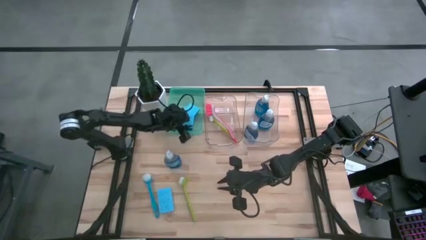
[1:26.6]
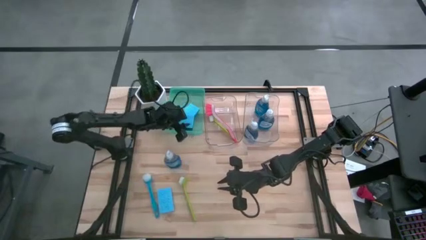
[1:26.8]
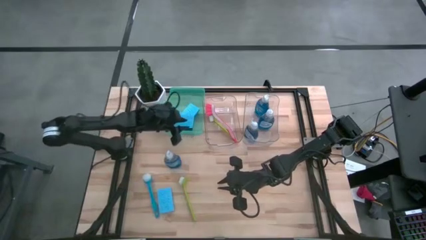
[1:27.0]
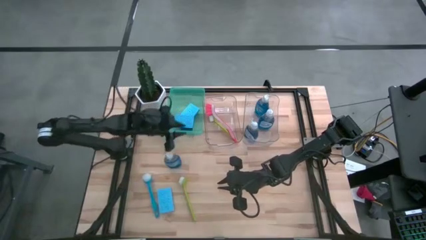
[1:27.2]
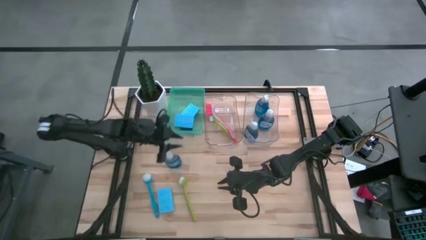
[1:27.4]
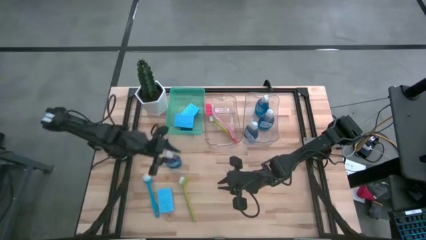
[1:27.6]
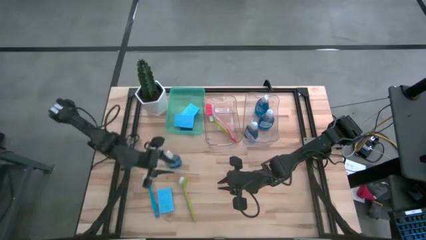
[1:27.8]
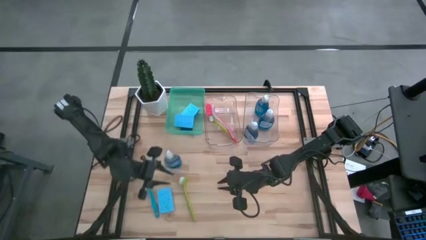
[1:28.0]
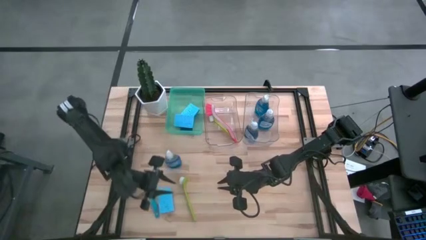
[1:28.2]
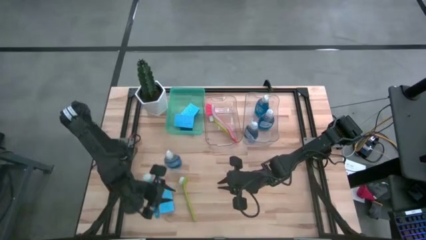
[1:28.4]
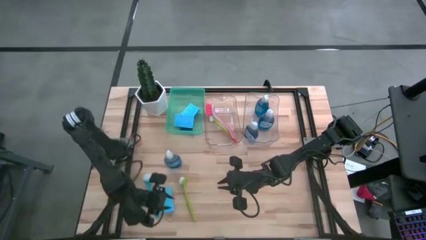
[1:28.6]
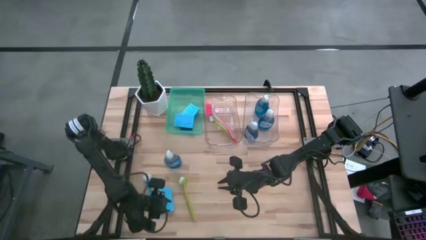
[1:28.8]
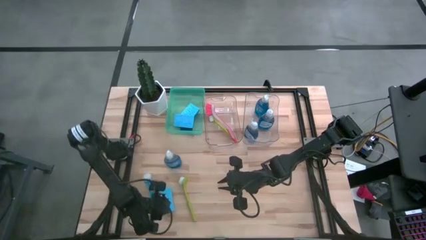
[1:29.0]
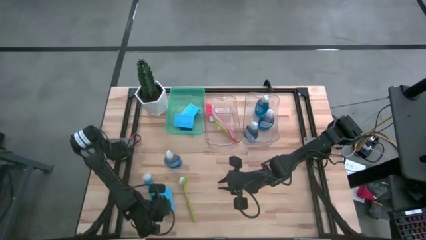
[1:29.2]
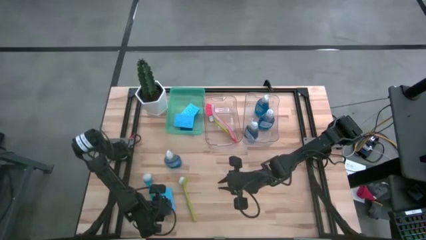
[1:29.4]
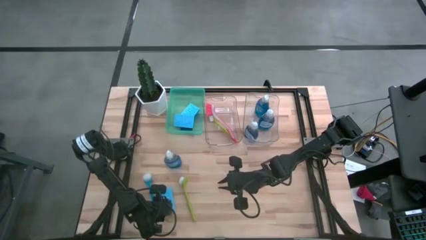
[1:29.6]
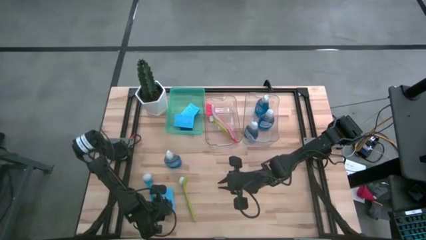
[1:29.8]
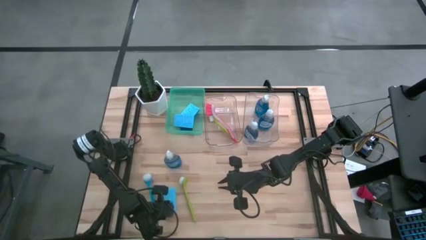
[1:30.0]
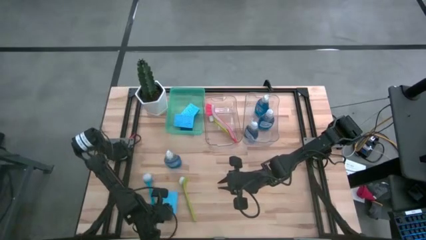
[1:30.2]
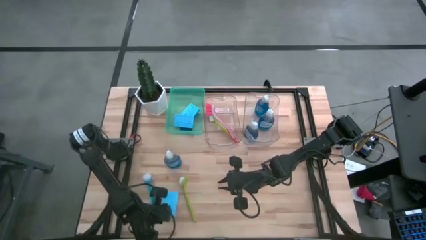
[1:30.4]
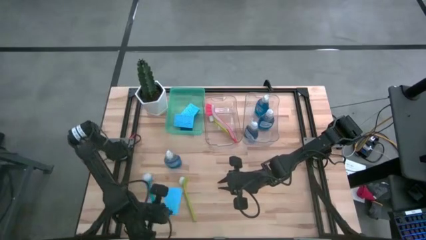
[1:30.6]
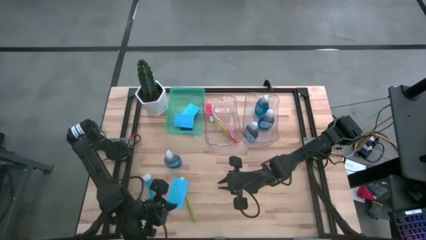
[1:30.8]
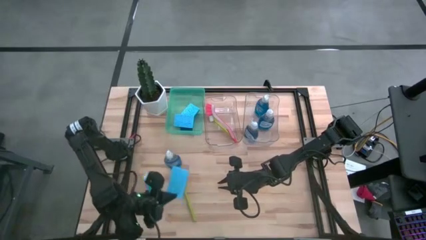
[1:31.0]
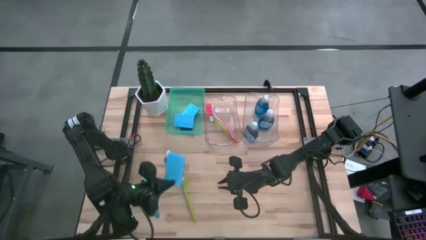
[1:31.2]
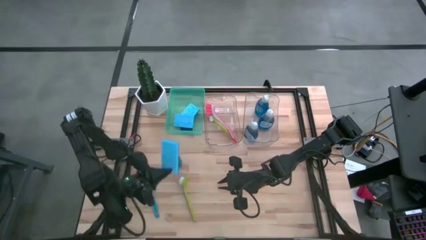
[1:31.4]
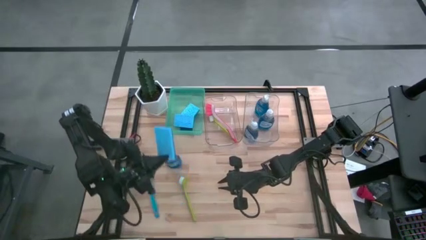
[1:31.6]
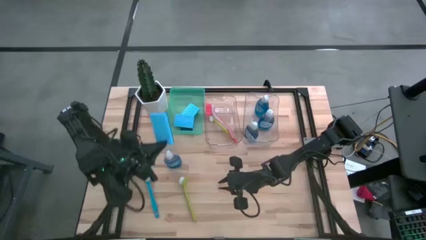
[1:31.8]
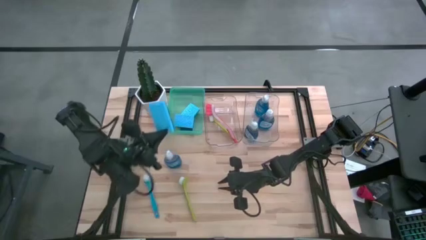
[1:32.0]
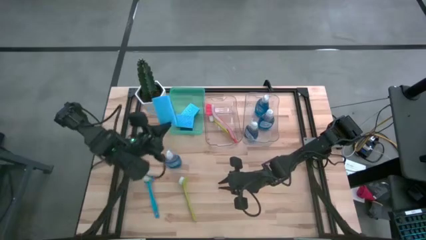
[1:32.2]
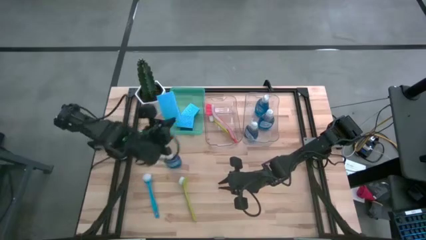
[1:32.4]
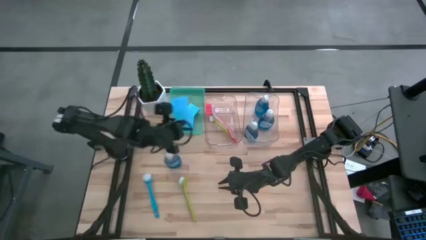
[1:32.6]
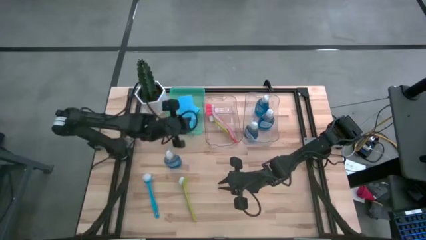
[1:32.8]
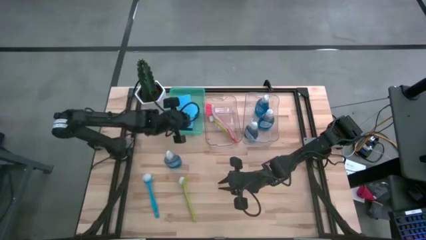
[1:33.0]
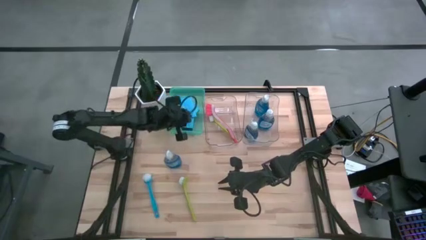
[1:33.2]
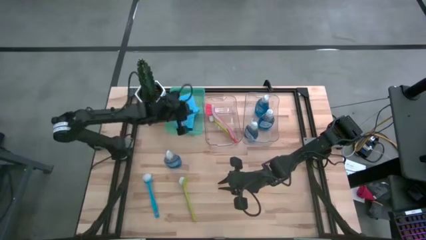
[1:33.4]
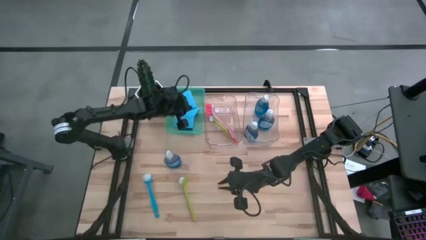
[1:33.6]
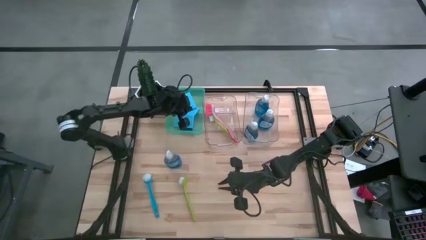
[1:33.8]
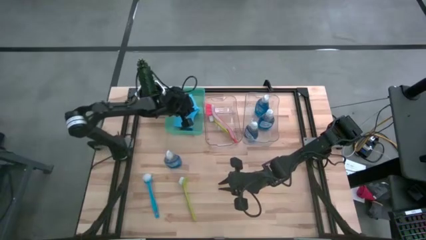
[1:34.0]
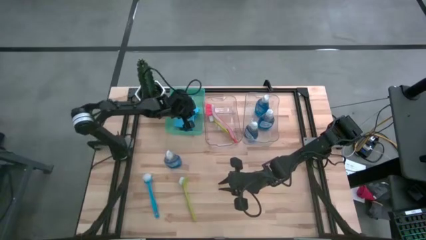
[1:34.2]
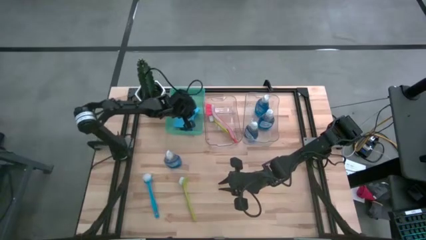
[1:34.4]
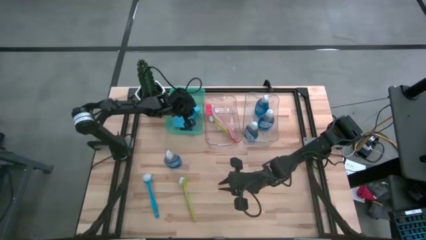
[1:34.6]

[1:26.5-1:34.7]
Task: Pick & Place Kitchen Sink Supplies
Put the blue sponge into the green bin

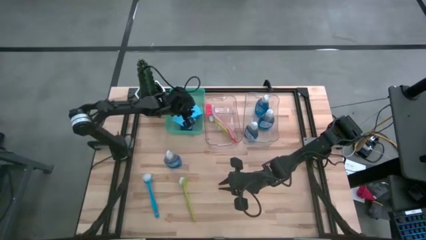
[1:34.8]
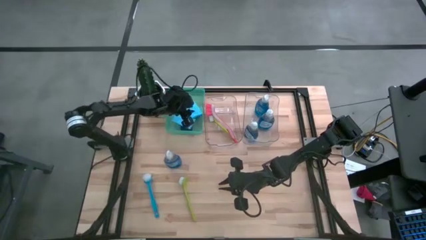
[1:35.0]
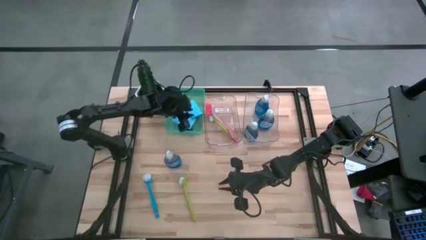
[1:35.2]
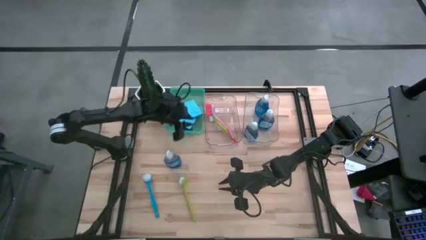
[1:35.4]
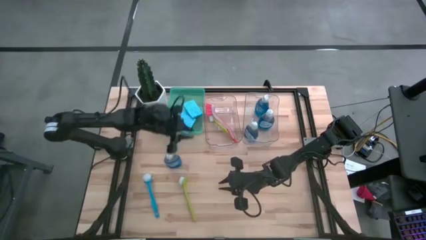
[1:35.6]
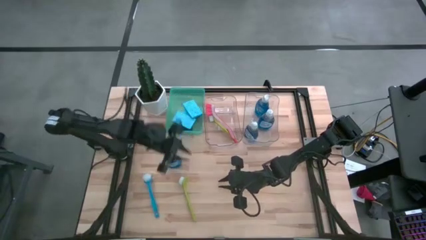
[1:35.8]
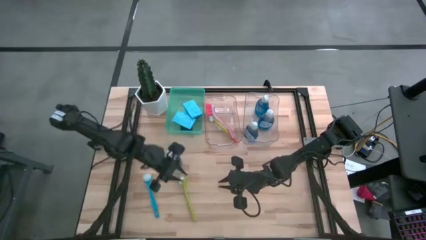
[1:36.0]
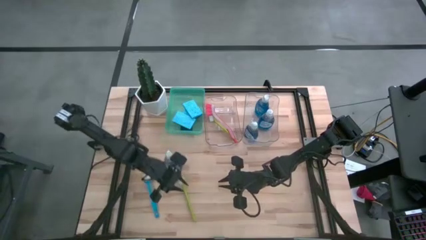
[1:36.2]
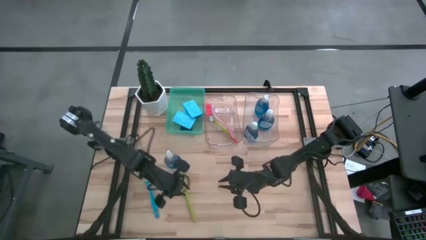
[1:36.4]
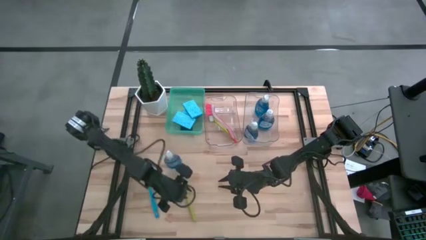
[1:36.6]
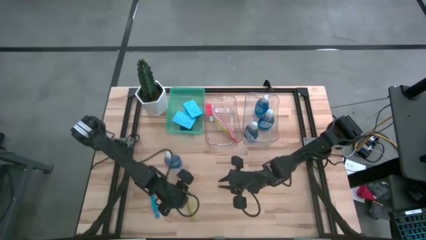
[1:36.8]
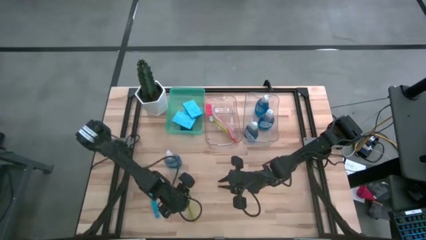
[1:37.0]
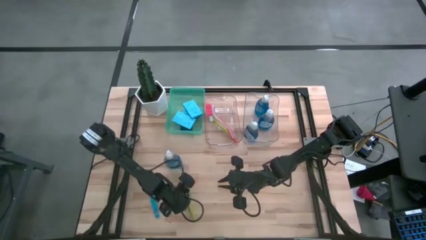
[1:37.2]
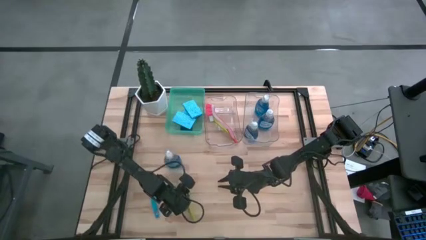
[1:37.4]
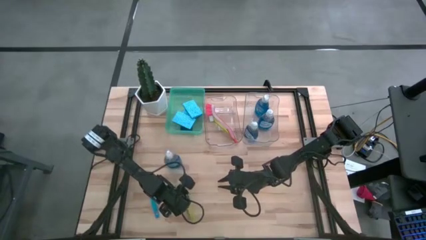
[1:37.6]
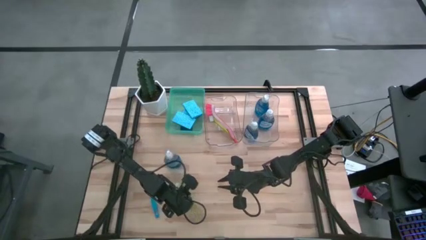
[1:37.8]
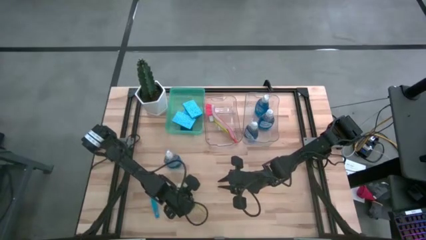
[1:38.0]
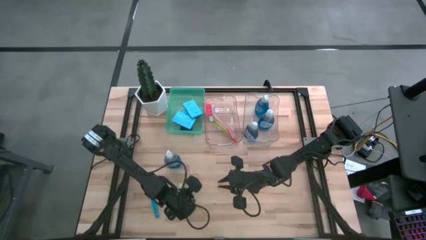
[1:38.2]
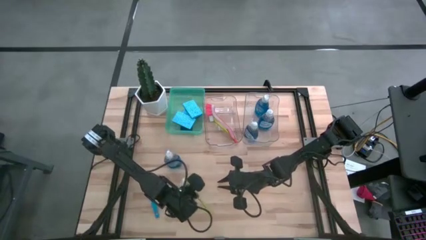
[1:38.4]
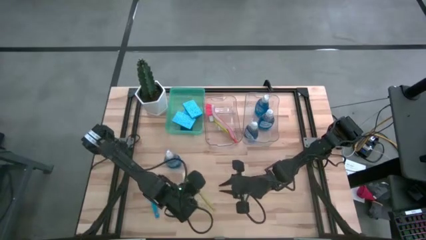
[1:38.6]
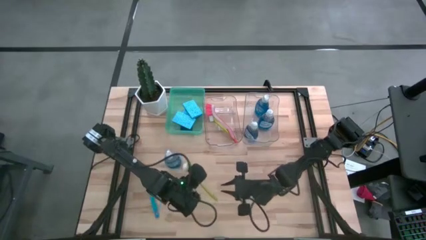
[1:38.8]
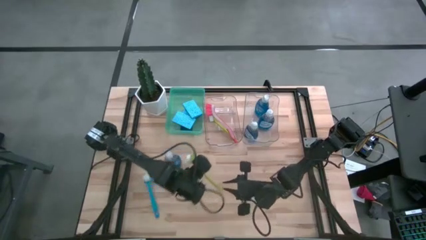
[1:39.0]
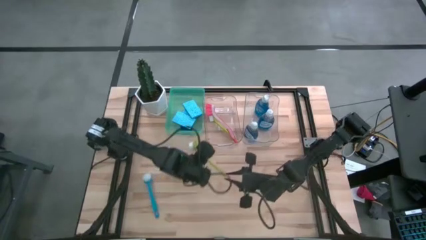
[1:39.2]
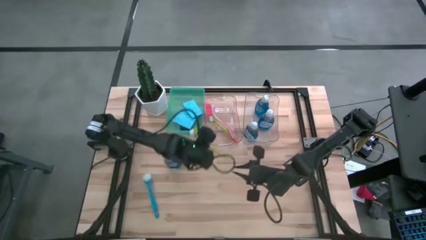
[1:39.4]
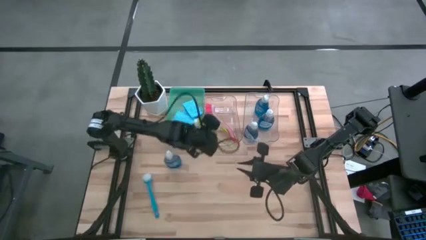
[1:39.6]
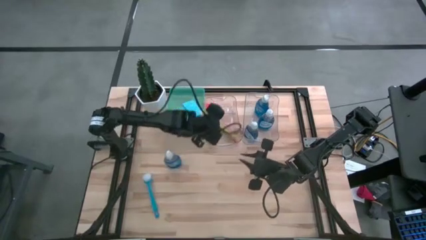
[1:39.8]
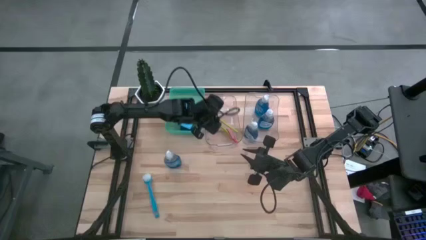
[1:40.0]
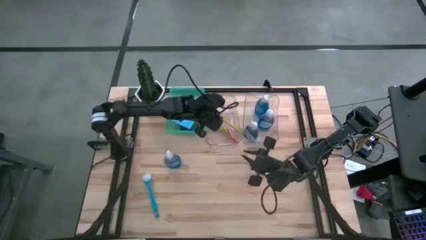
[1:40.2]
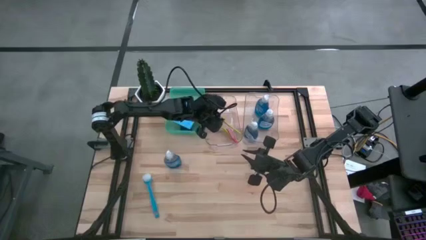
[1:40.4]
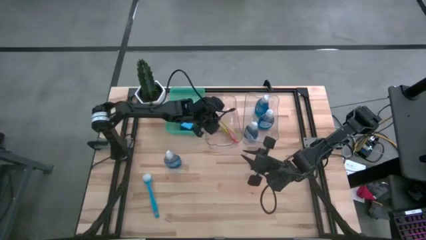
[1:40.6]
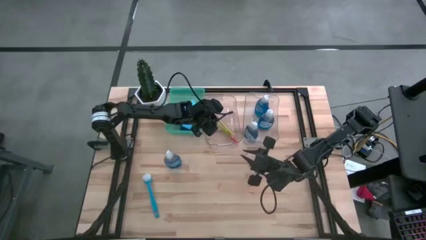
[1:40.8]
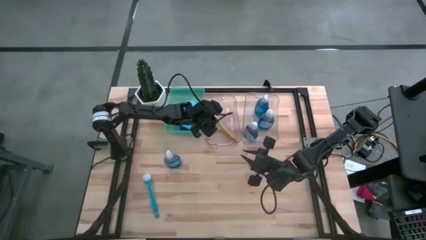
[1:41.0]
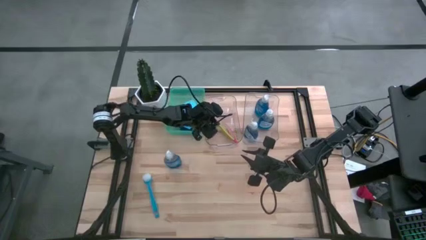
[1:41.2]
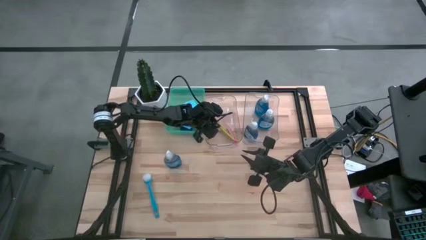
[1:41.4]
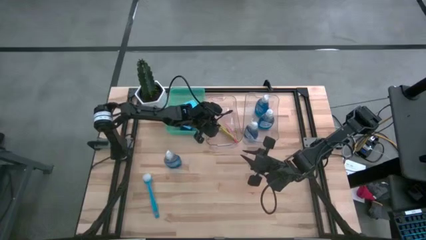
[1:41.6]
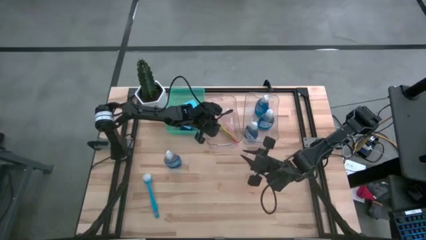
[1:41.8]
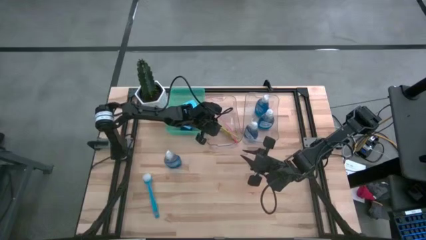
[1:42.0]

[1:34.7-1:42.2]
Put the green dish brush into the left transparent bin

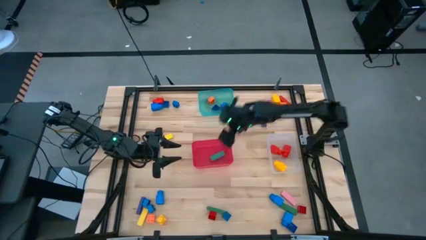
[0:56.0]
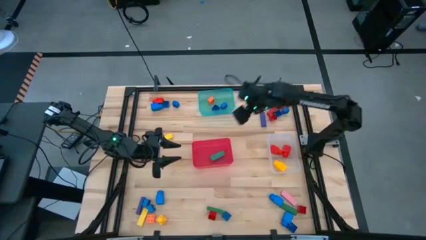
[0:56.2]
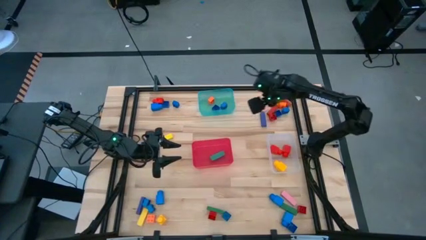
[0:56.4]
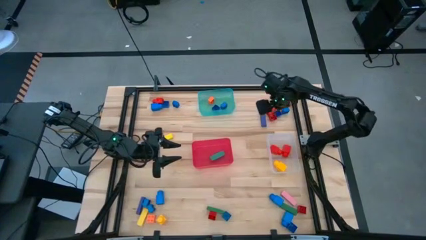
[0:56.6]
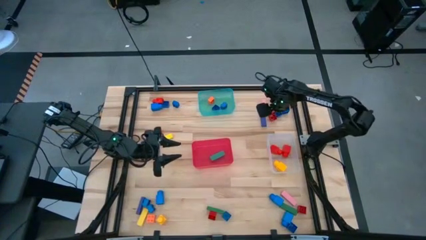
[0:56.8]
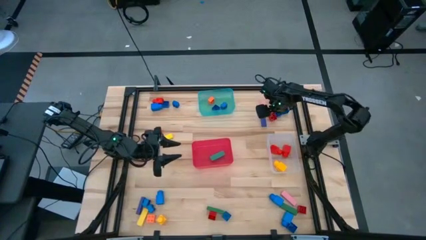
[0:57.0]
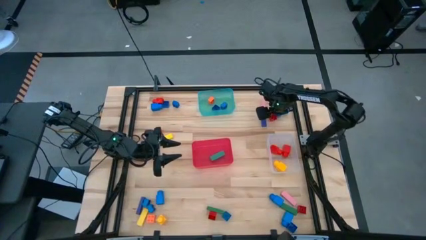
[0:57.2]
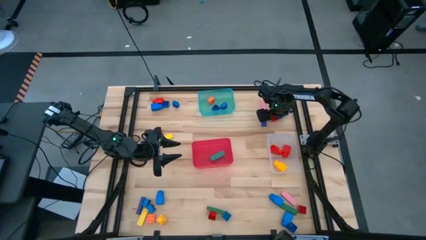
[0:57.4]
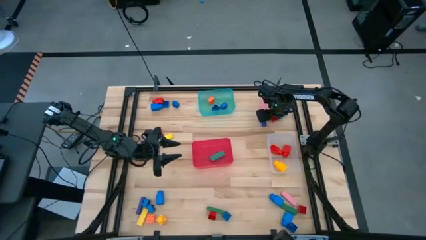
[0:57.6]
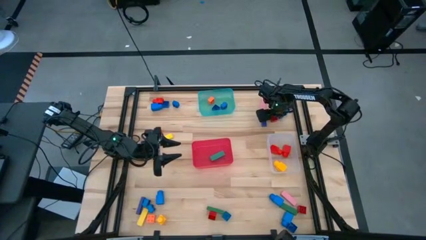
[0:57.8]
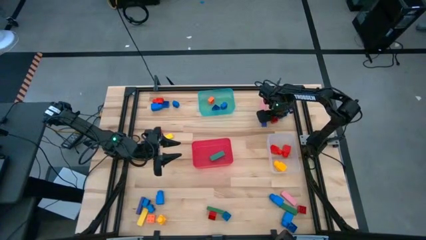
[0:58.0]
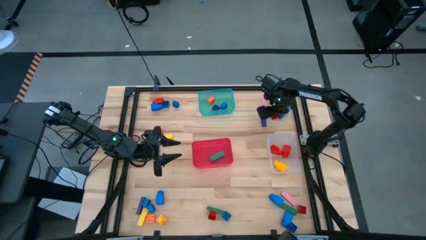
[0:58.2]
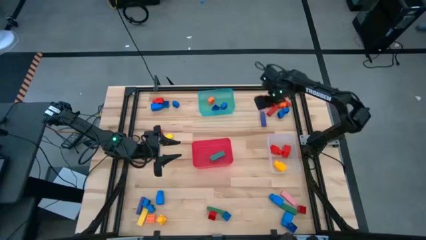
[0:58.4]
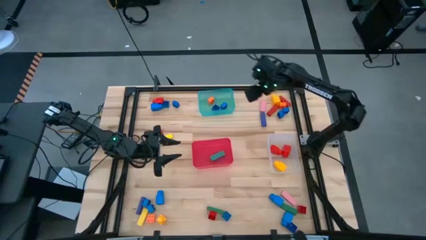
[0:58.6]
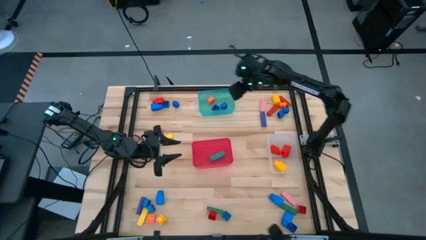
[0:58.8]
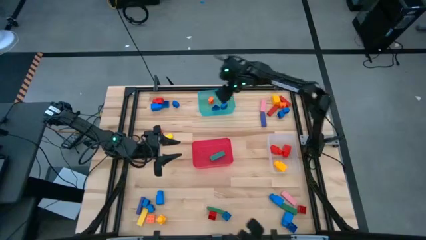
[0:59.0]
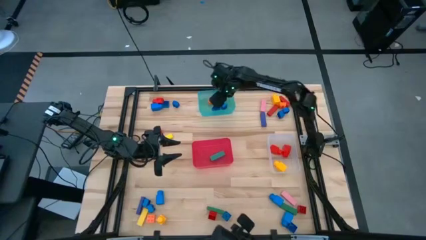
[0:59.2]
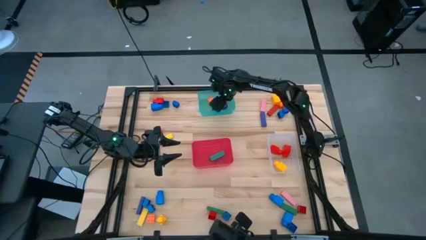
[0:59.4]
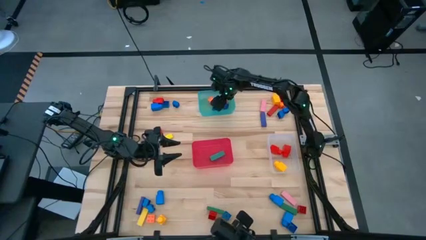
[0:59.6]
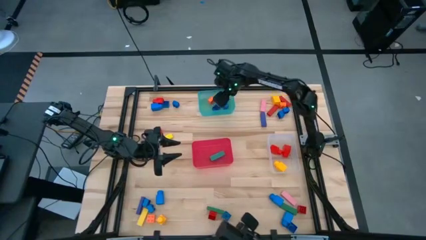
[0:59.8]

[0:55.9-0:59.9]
Task: Sort blocks by size
Put the red 4 stud game piece into the blue bin
